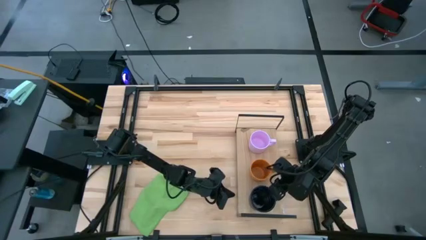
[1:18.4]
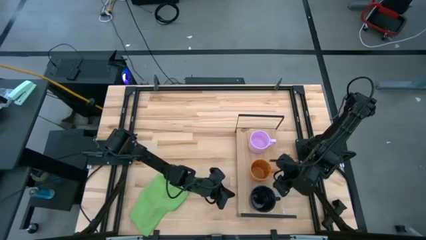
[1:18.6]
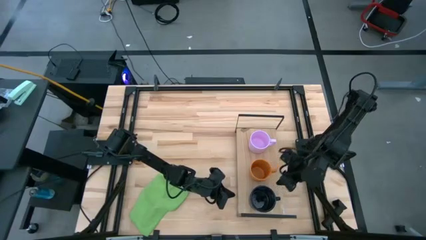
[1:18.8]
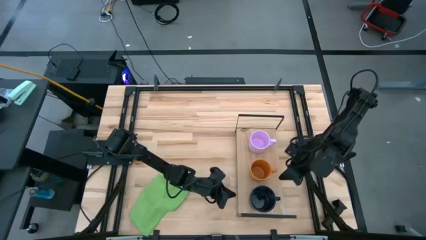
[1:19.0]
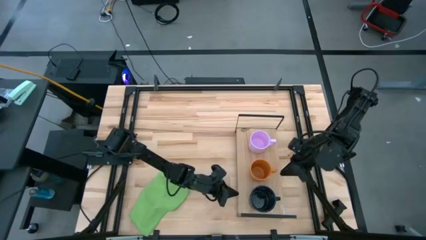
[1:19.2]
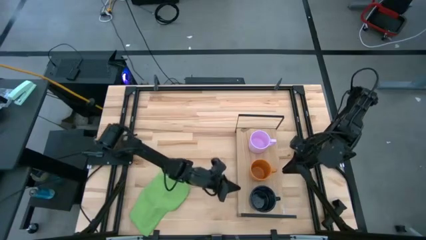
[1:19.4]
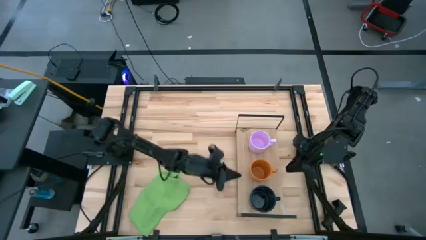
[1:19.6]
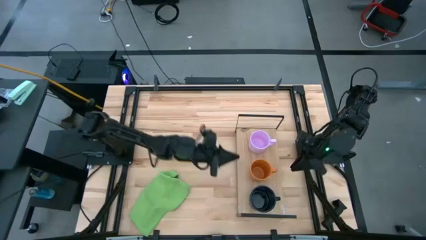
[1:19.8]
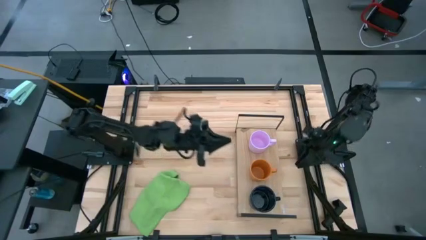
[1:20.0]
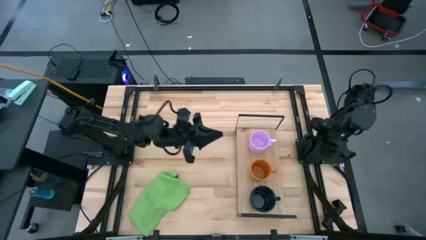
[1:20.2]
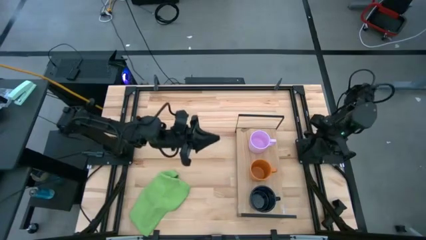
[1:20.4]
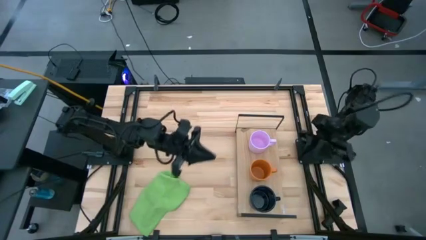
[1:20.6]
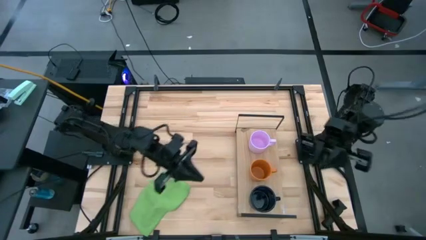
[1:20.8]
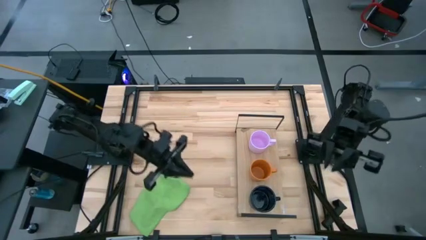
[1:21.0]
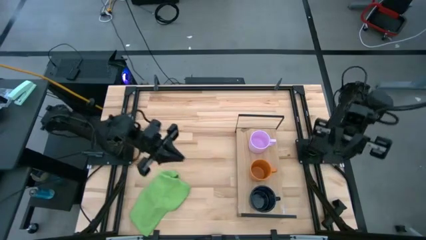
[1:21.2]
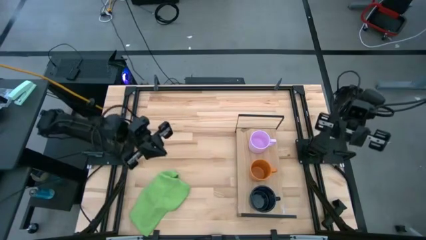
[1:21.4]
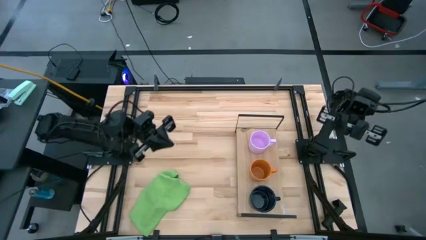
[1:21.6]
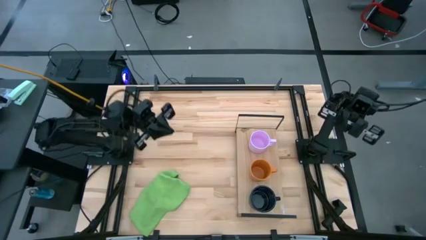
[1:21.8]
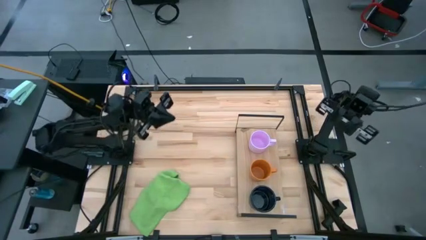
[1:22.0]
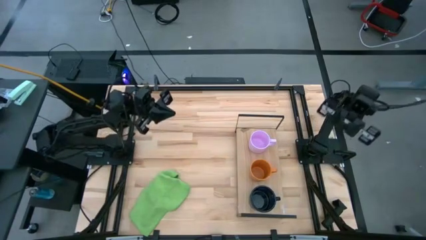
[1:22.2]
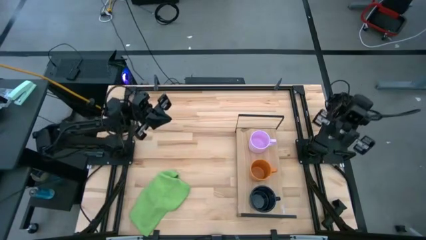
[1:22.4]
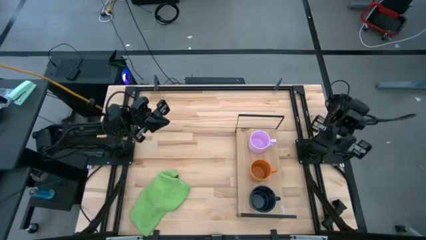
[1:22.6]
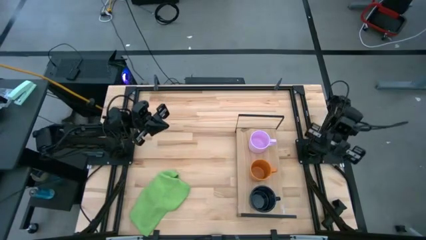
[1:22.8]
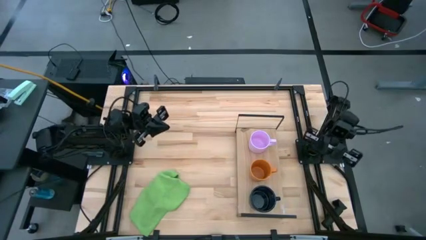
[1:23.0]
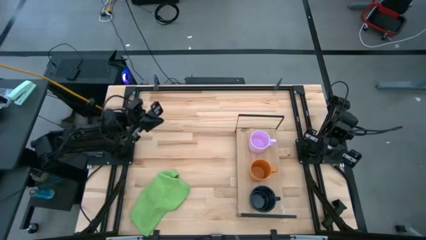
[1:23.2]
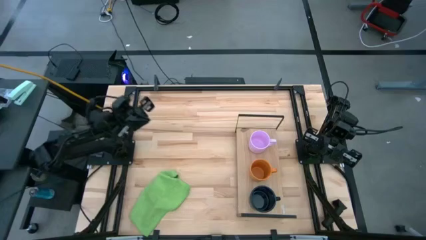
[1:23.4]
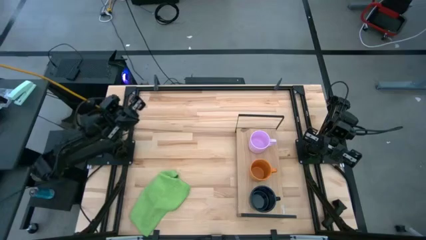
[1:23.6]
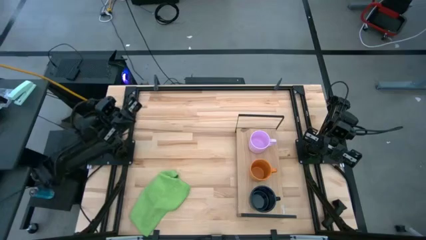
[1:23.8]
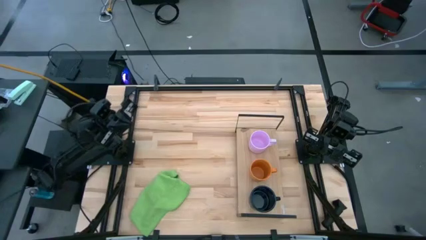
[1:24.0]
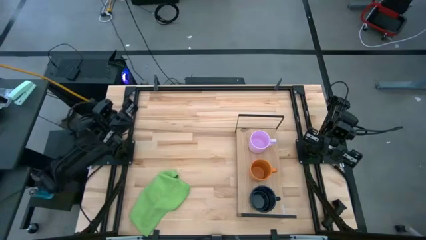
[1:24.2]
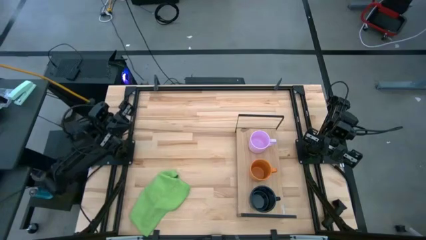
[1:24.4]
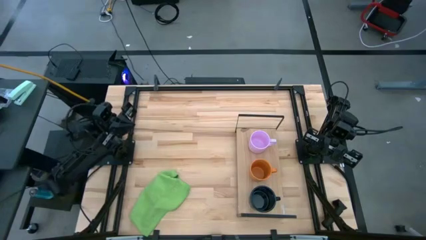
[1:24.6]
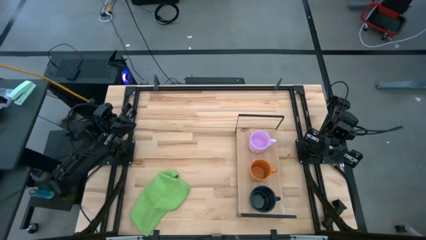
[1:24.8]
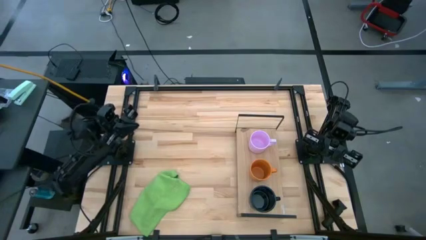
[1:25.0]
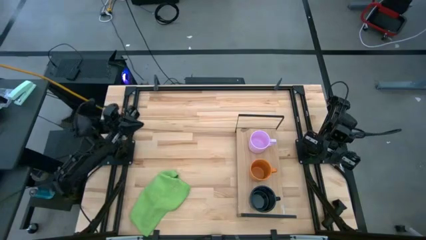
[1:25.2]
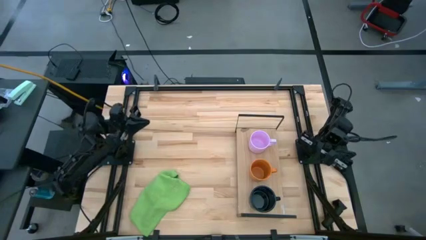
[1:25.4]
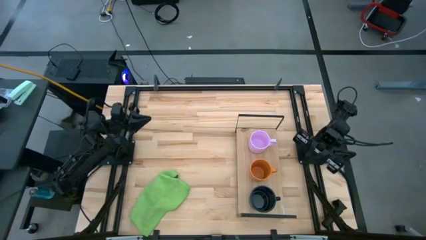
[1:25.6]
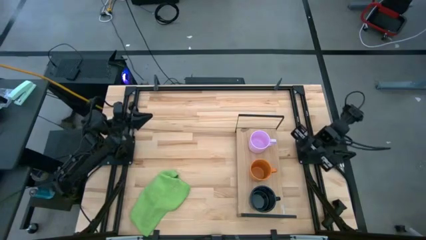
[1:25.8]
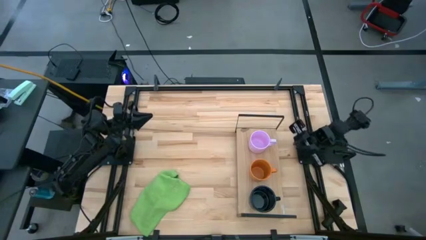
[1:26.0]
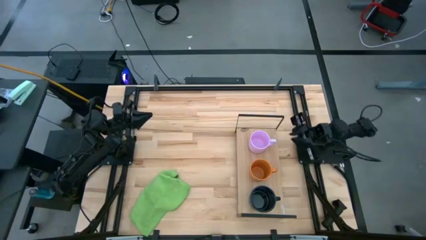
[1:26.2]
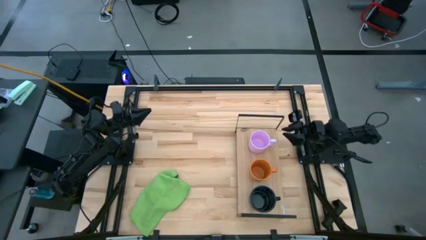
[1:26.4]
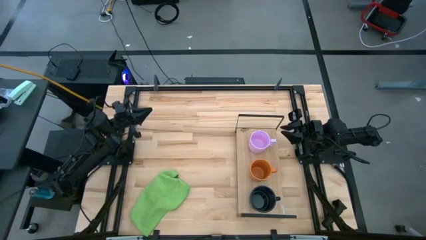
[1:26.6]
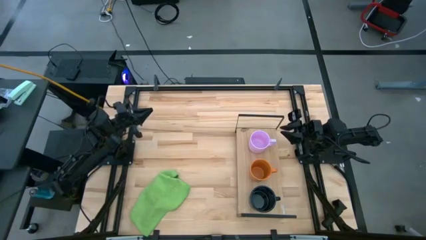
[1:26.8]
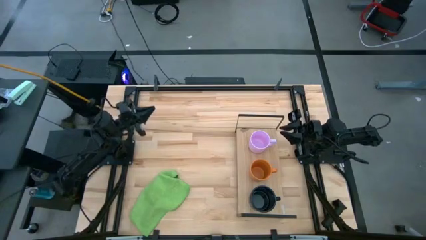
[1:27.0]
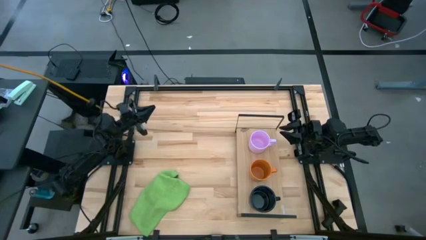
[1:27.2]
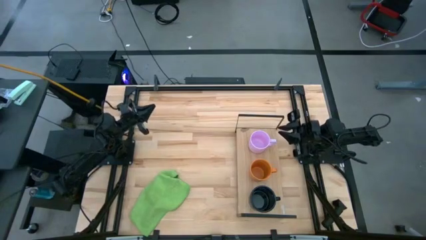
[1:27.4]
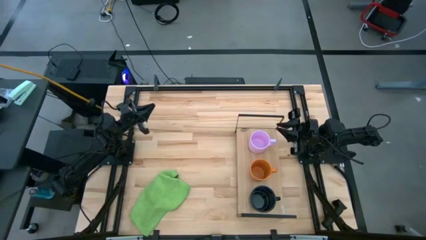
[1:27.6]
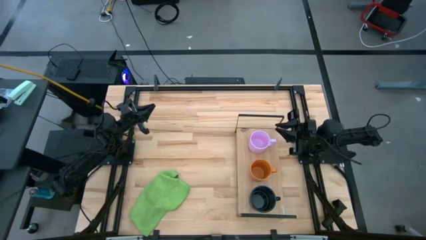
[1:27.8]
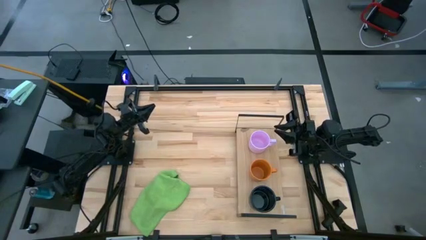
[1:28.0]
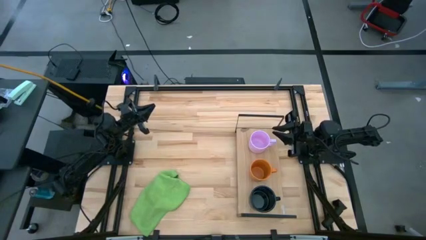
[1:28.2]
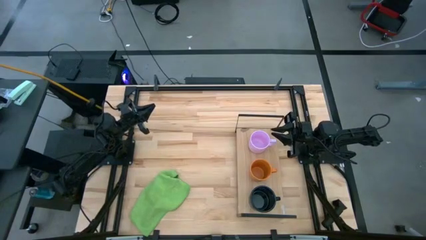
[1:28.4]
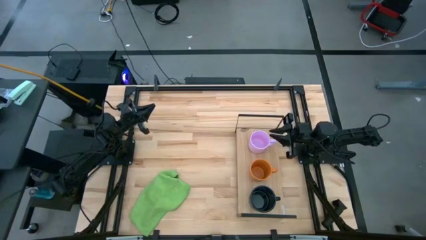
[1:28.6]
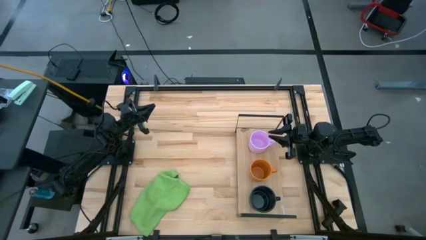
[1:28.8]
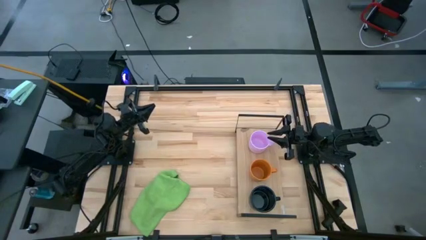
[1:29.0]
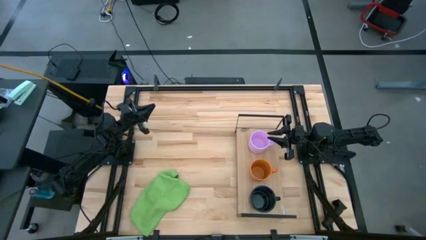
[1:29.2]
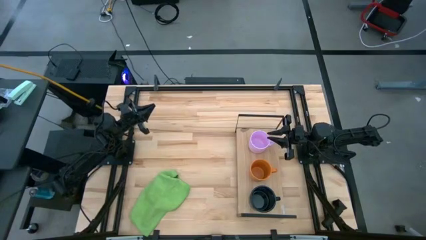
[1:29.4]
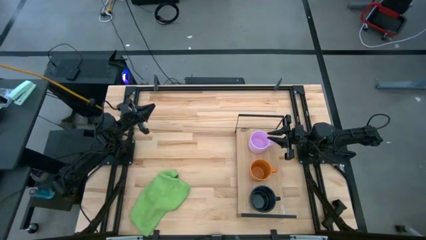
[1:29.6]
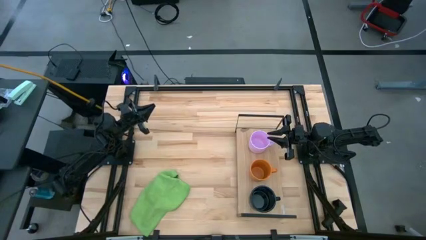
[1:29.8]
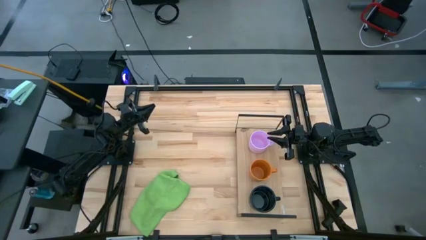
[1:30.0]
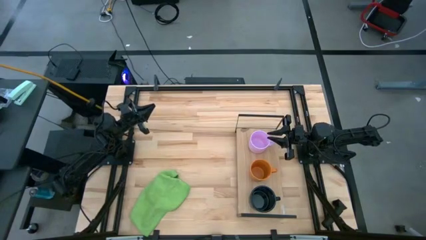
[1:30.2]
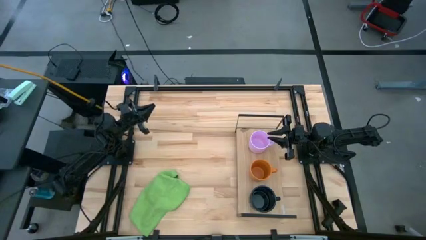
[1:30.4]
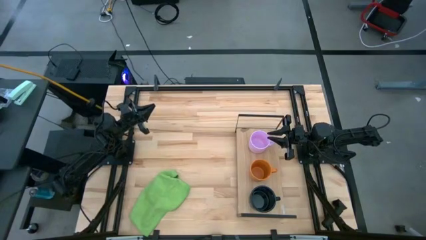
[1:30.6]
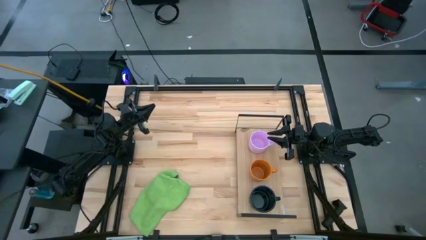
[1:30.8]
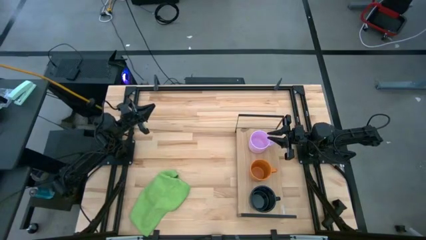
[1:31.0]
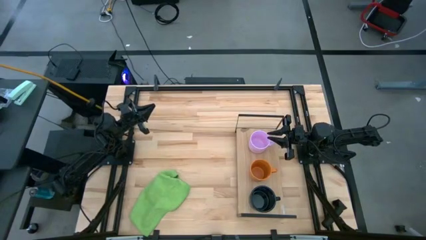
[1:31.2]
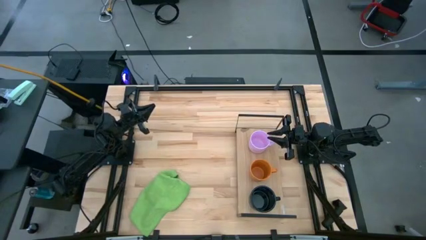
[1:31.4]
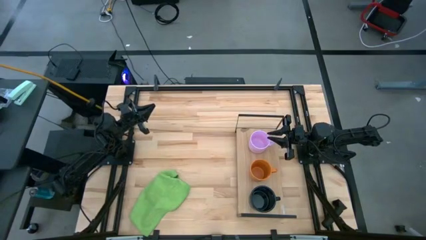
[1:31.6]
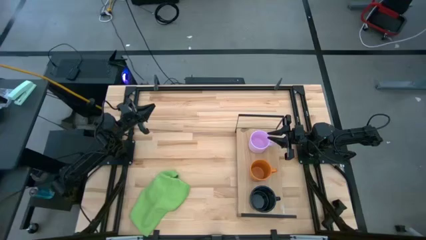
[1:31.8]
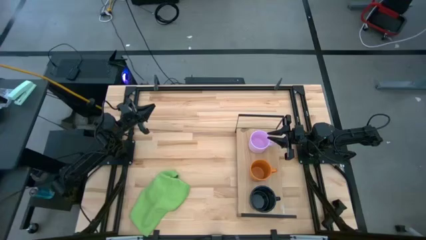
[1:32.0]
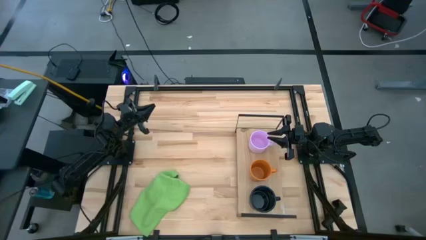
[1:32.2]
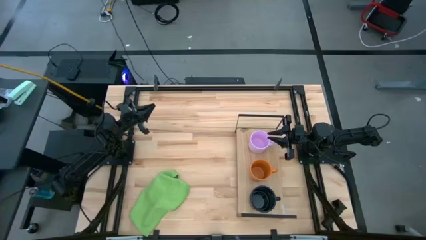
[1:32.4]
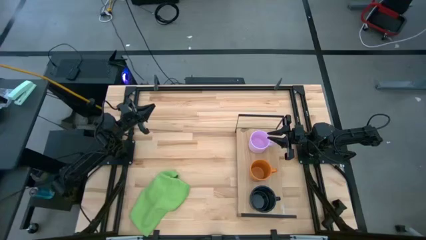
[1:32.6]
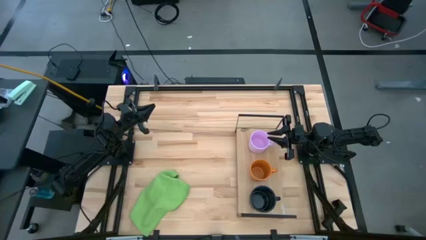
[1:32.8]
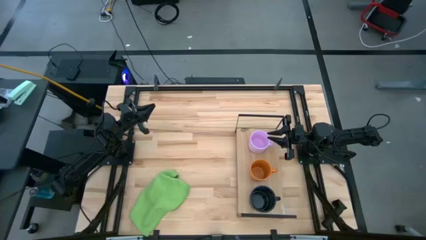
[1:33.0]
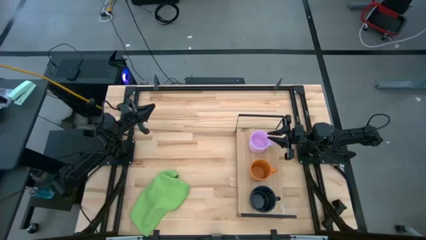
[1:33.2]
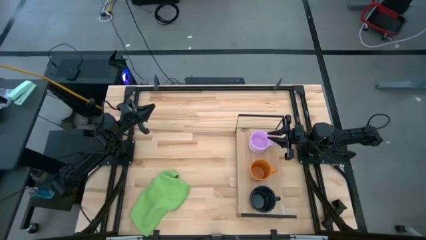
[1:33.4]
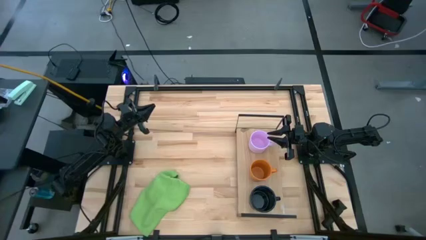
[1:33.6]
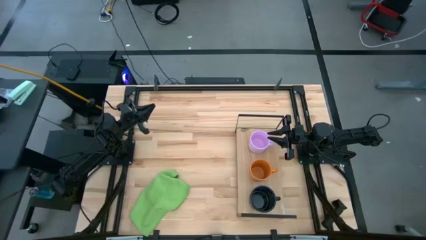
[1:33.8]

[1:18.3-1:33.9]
Task: Stack small to large cups/mugs on shelf
Return to Home Position
